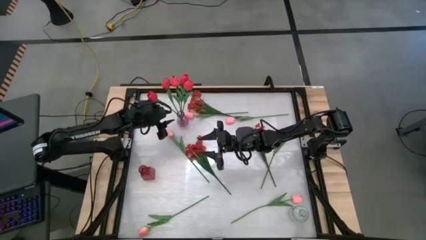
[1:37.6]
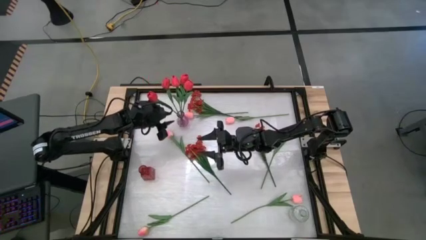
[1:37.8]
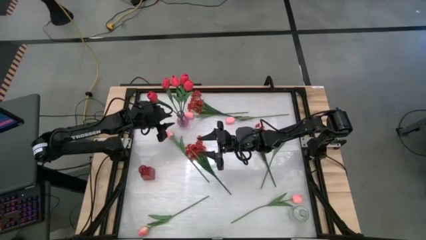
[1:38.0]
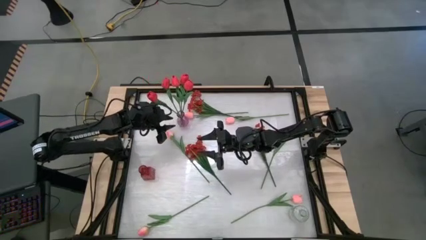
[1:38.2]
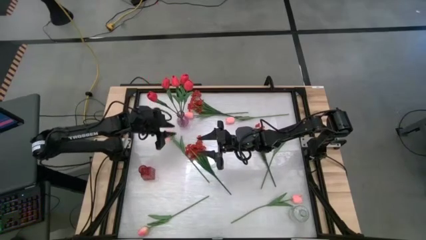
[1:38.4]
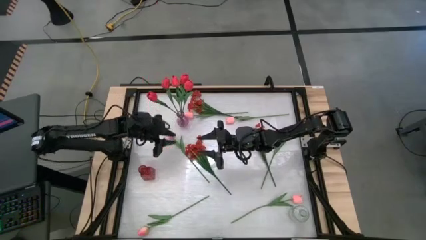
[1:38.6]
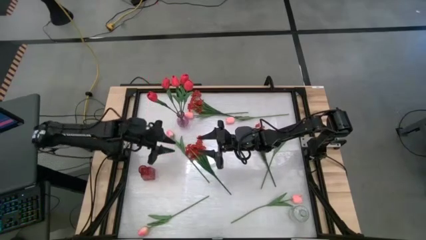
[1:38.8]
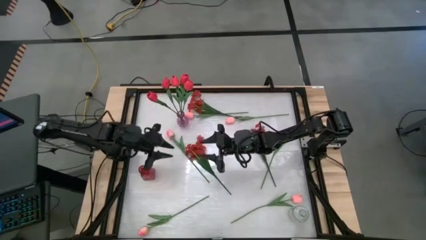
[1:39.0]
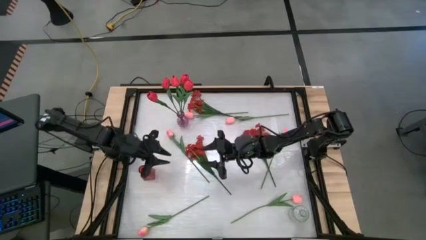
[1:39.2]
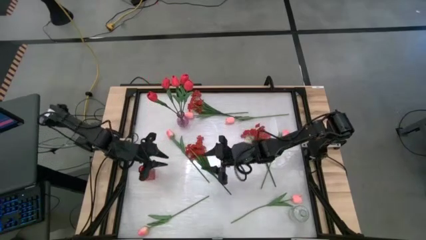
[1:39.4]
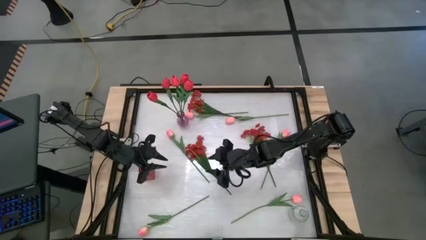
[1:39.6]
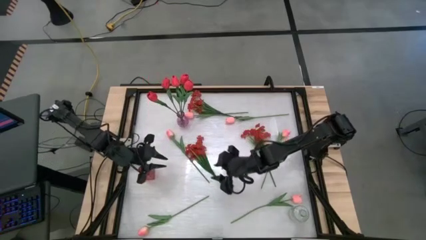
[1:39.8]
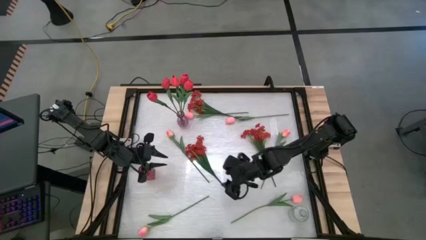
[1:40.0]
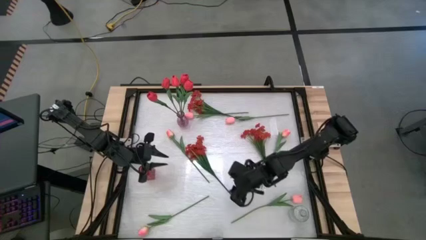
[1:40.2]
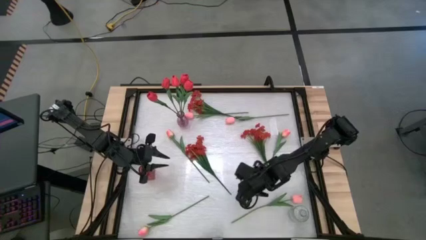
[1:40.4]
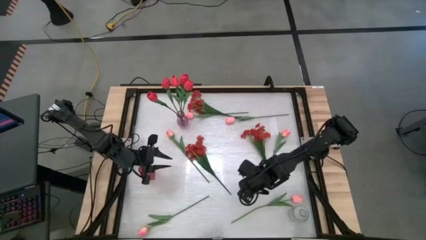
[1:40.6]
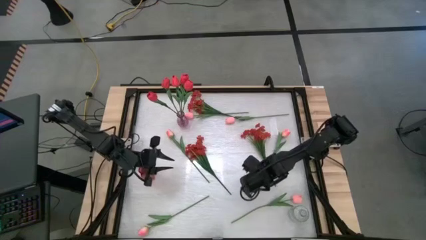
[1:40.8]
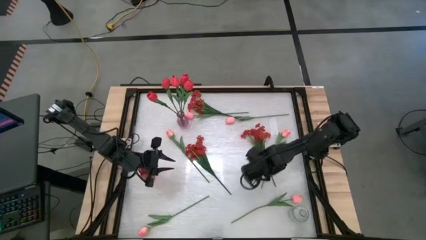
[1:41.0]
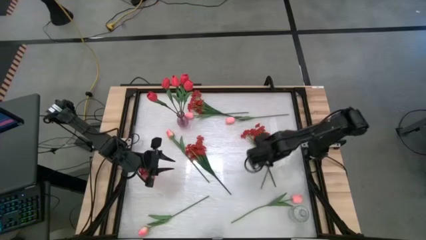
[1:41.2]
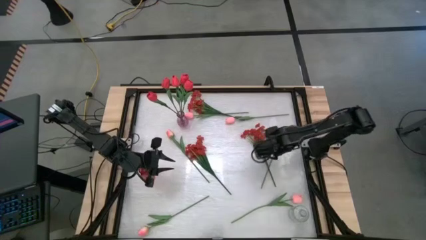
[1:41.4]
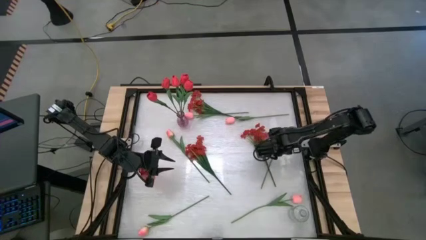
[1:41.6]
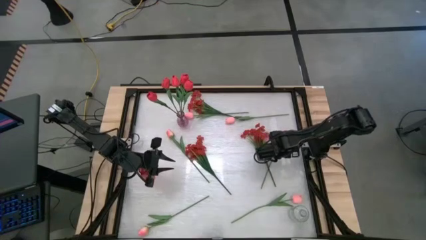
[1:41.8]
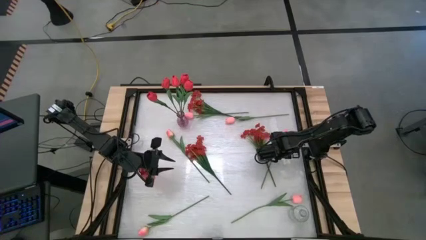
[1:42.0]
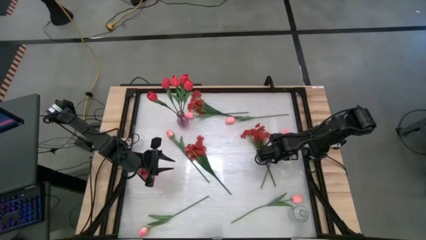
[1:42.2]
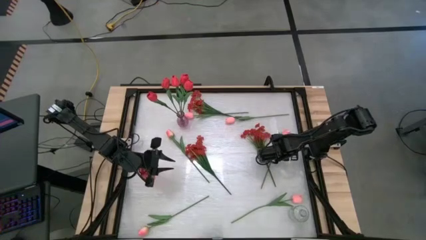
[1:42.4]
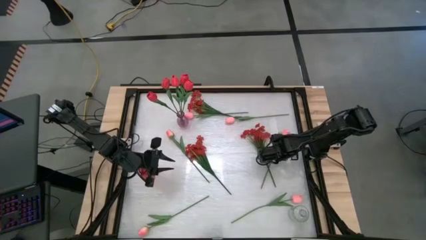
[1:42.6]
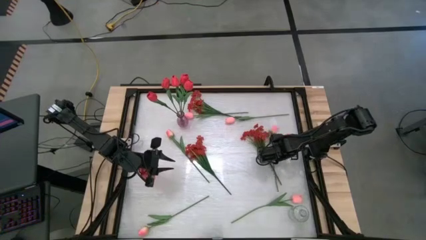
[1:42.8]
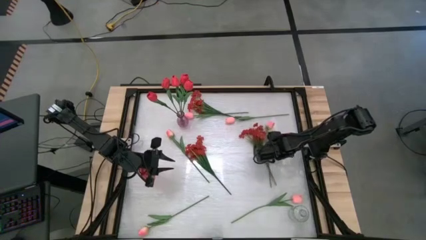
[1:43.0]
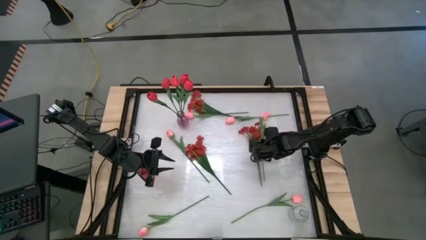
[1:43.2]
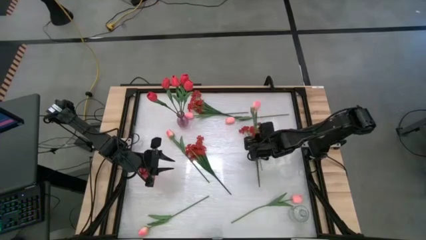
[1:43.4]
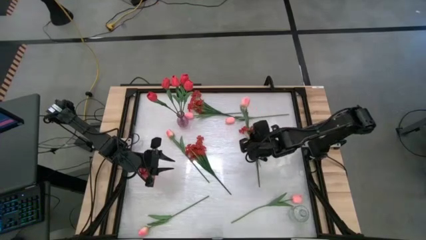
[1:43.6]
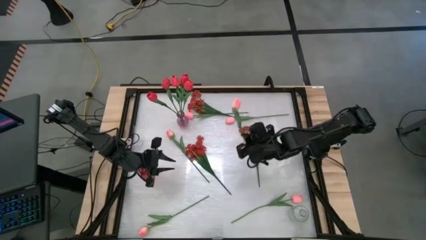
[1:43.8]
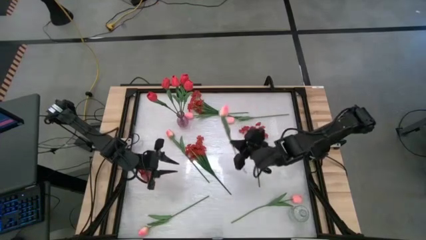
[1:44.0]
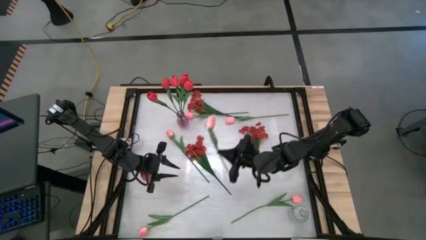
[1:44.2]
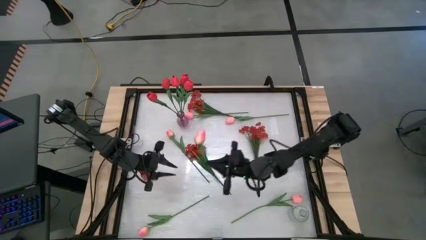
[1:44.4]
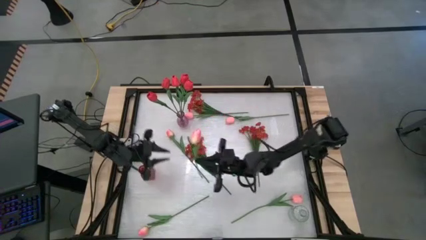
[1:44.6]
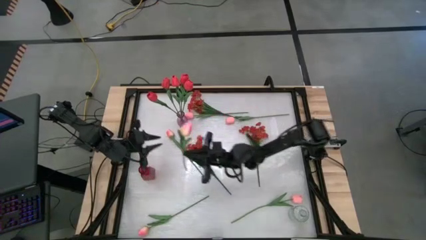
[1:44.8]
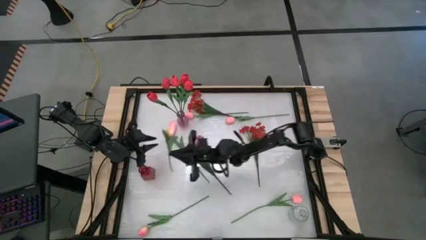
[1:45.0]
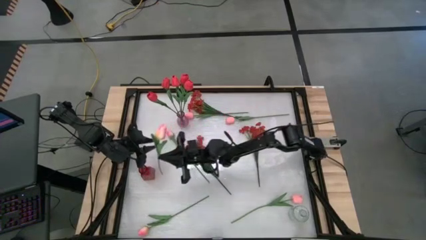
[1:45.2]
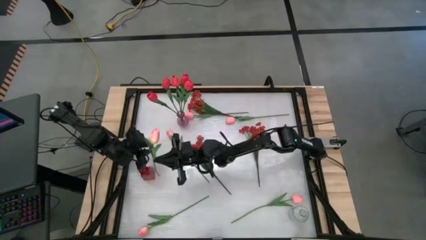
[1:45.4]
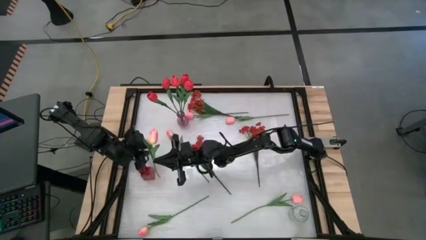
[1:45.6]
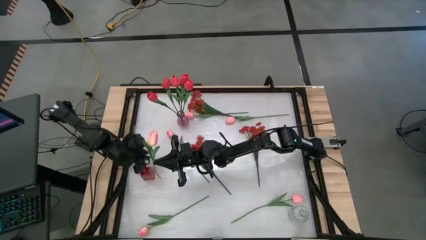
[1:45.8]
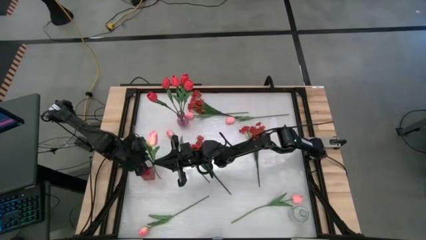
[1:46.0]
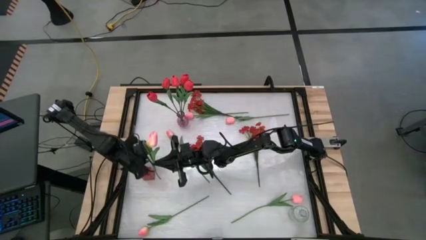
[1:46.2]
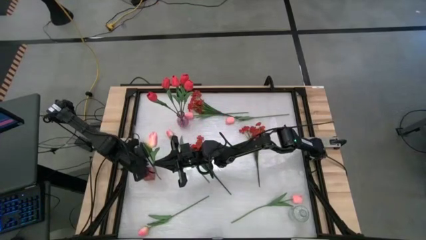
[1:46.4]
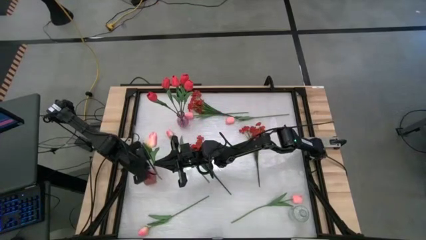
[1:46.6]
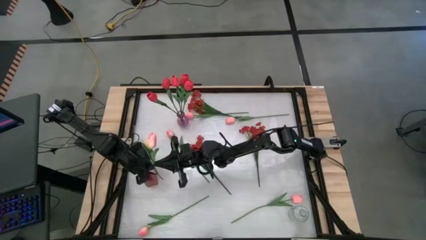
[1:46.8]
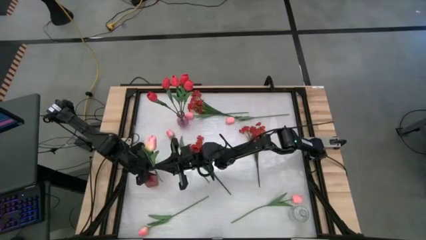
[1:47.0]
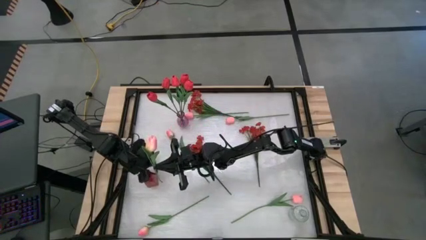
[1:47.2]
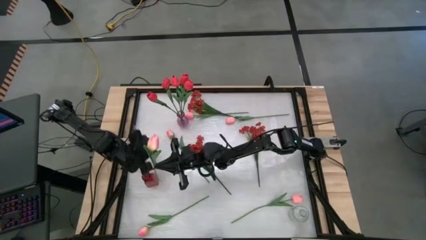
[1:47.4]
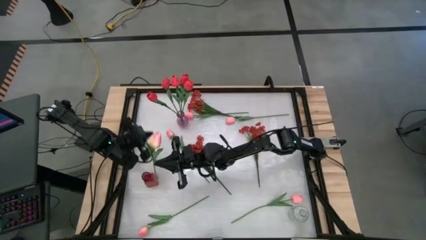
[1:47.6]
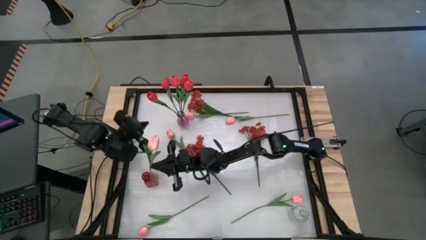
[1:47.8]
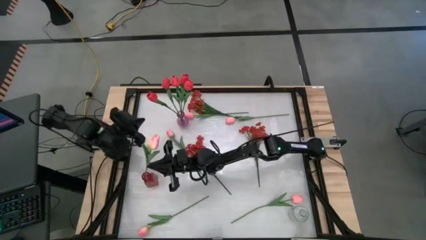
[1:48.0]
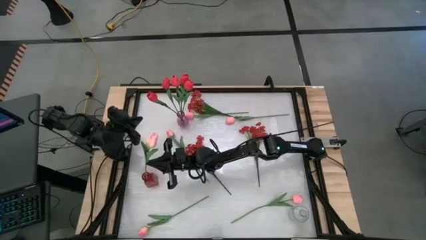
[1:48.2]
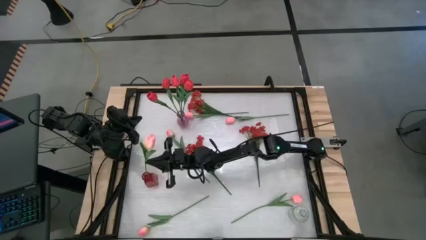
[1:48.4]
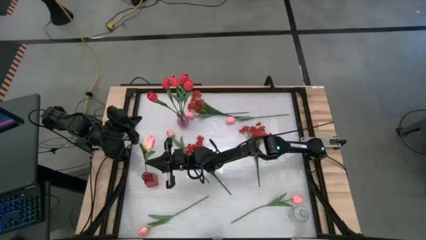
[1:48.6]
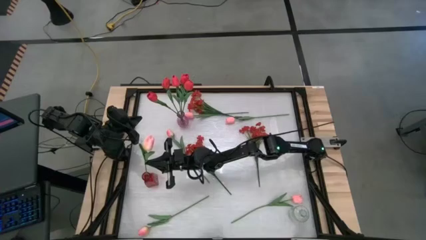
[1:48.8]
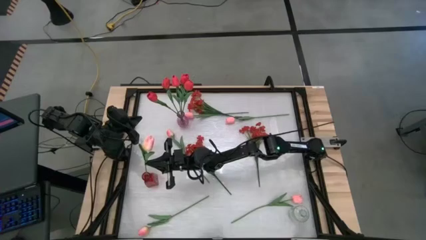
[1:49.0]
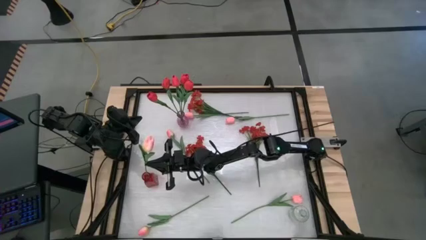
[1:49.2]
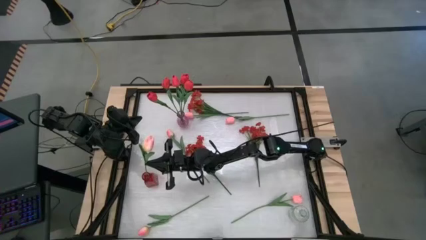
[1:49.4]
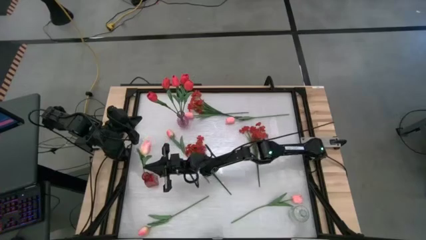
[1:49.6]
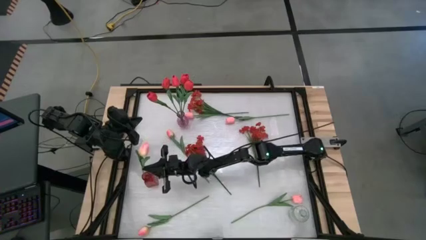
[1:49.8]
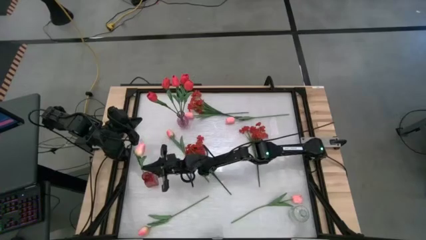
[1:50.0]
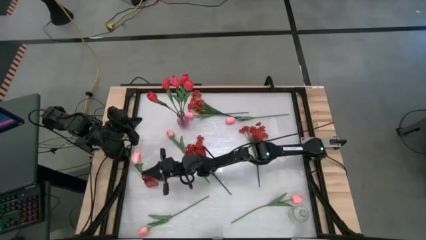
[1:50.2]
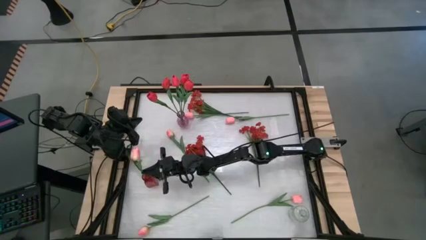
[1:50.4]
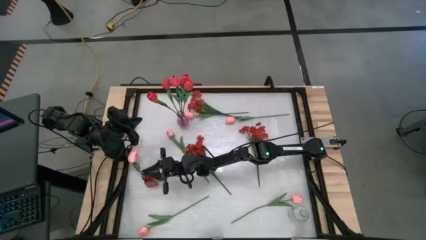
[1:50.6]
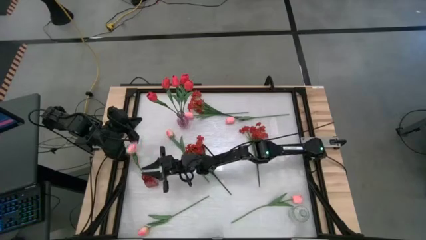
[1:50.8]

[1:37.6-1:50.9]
Task: Sort flowers into vase by color
Put the pink tulip into the red vase
